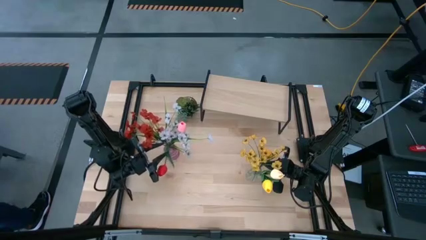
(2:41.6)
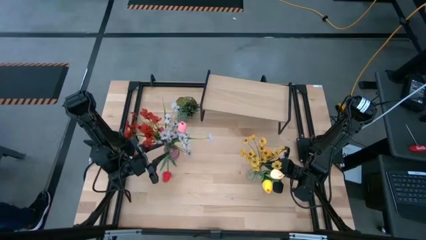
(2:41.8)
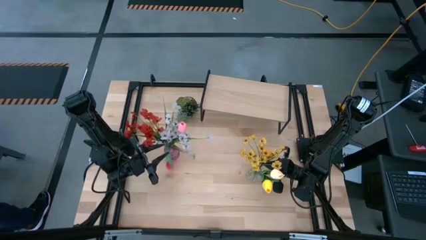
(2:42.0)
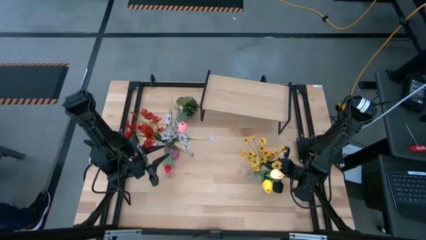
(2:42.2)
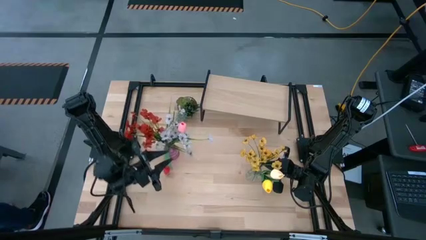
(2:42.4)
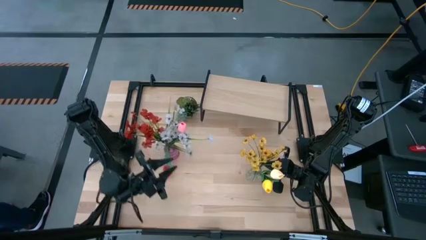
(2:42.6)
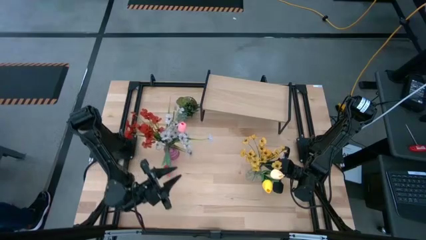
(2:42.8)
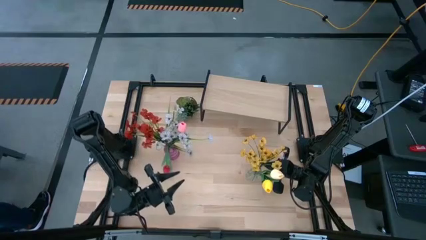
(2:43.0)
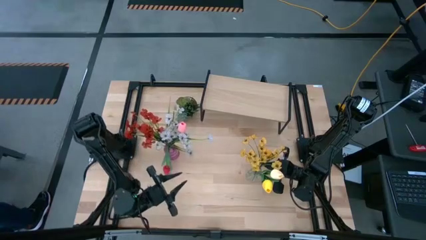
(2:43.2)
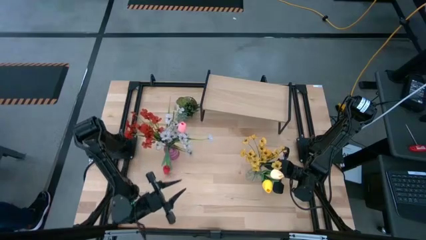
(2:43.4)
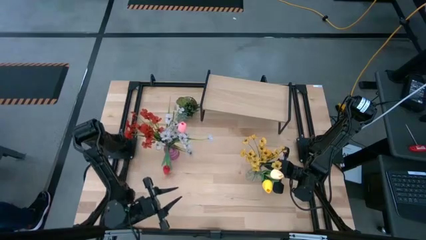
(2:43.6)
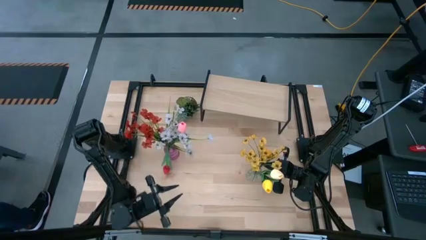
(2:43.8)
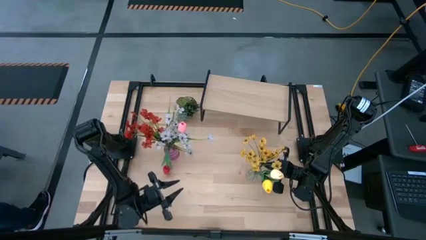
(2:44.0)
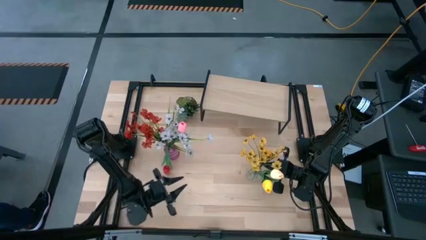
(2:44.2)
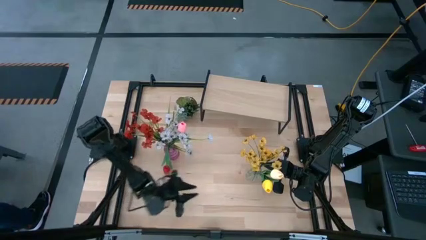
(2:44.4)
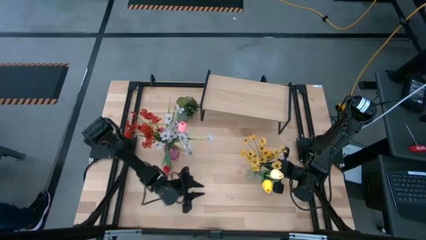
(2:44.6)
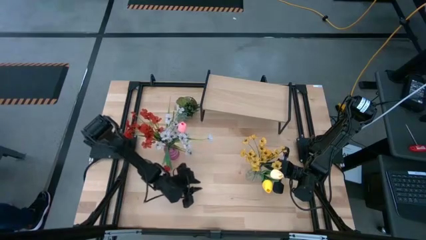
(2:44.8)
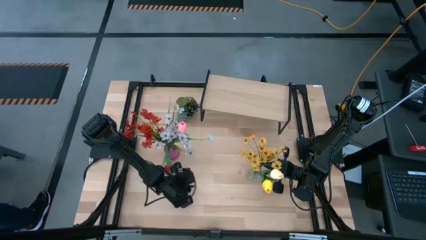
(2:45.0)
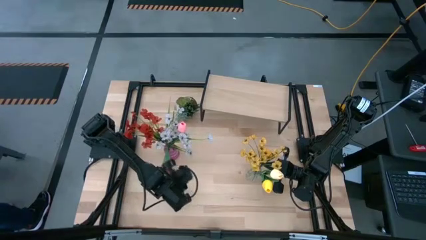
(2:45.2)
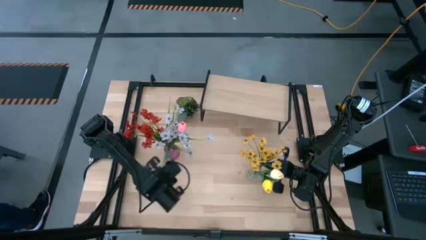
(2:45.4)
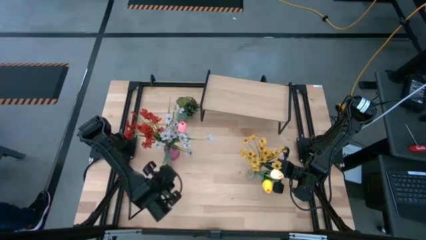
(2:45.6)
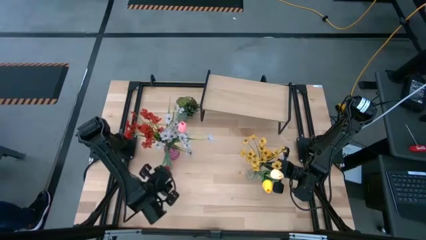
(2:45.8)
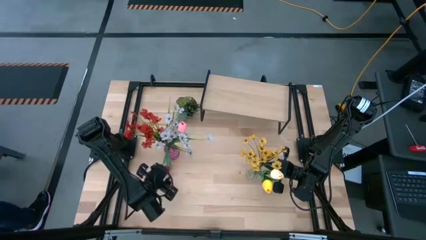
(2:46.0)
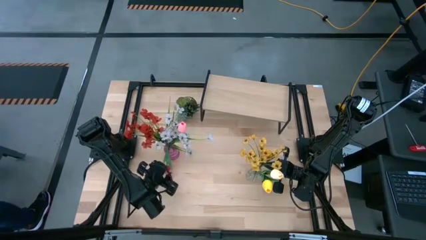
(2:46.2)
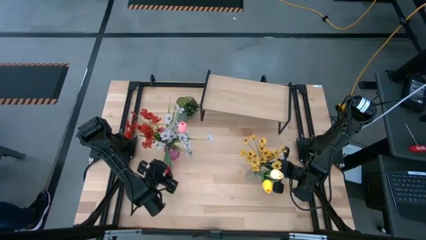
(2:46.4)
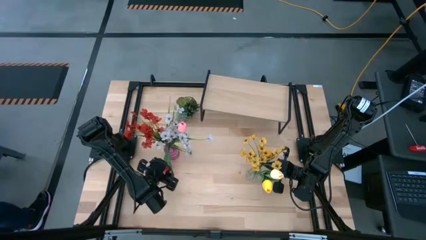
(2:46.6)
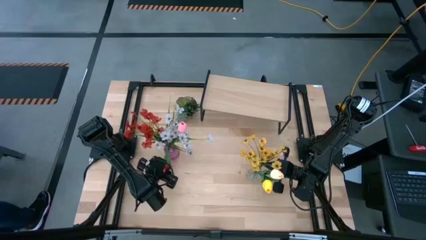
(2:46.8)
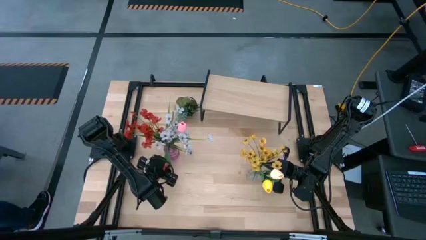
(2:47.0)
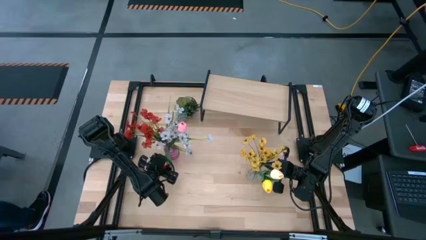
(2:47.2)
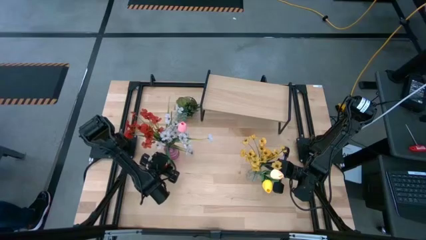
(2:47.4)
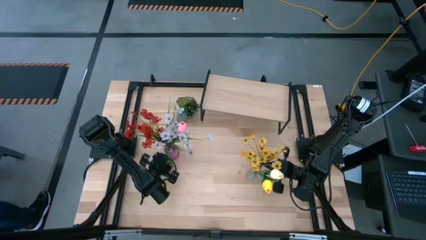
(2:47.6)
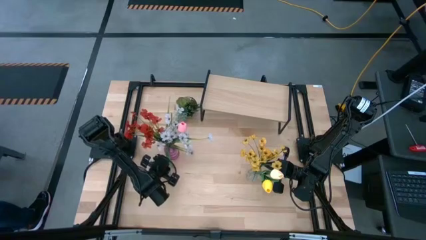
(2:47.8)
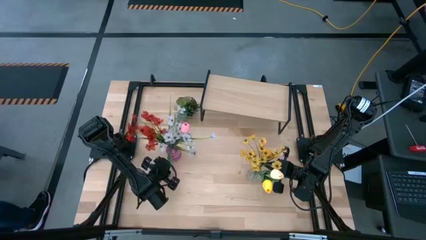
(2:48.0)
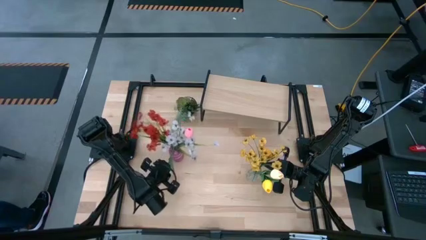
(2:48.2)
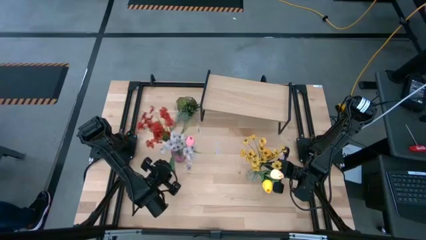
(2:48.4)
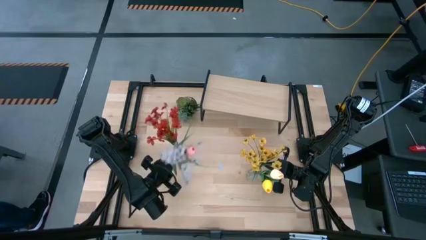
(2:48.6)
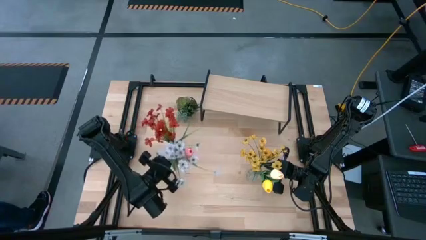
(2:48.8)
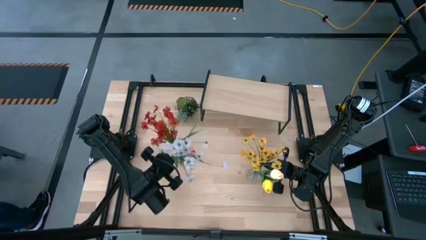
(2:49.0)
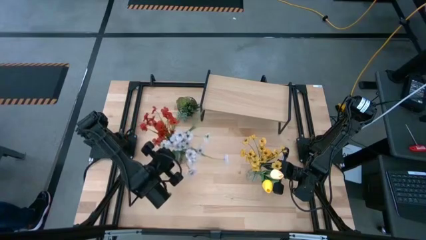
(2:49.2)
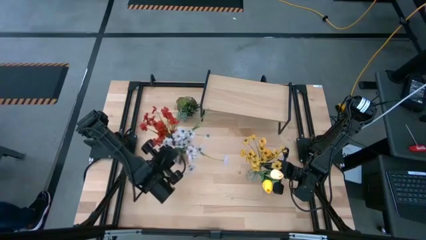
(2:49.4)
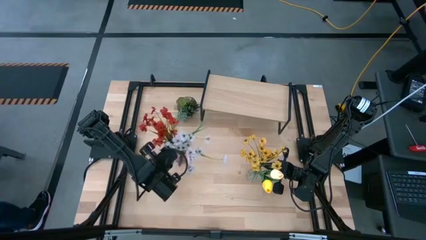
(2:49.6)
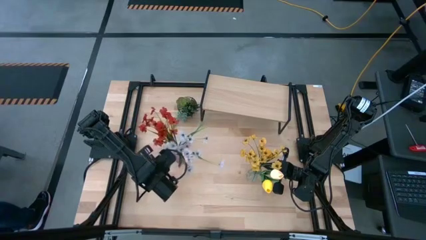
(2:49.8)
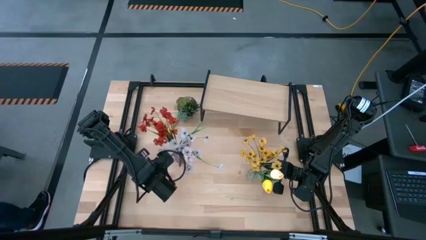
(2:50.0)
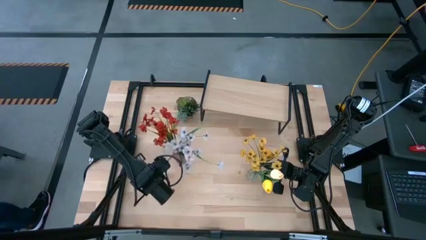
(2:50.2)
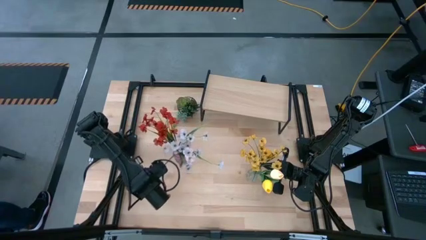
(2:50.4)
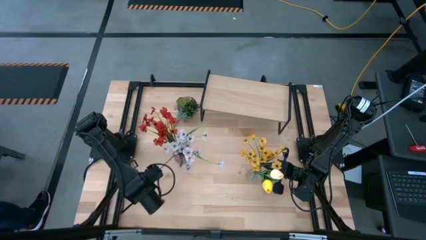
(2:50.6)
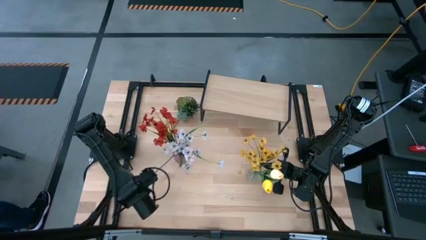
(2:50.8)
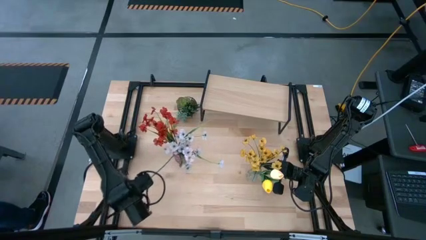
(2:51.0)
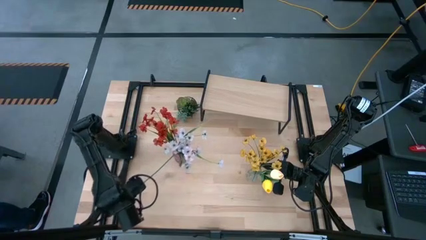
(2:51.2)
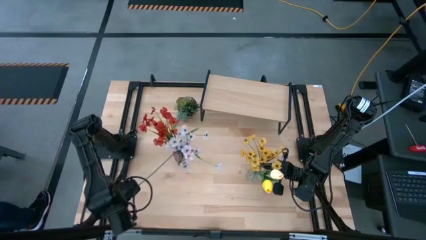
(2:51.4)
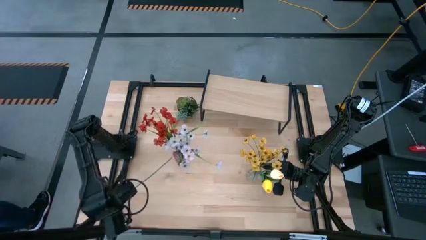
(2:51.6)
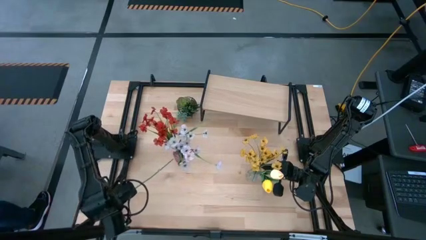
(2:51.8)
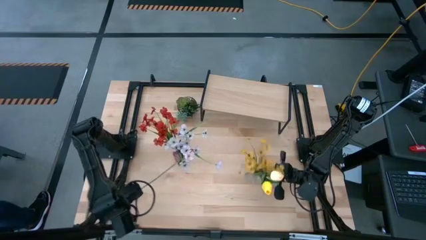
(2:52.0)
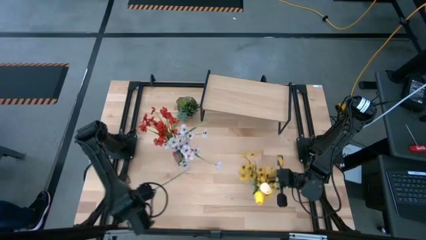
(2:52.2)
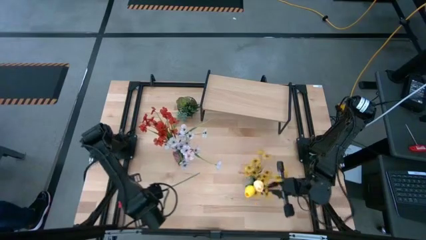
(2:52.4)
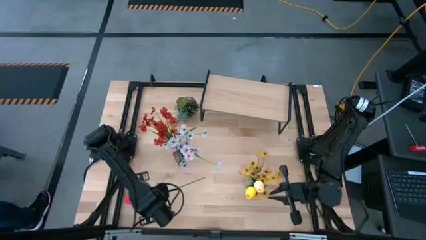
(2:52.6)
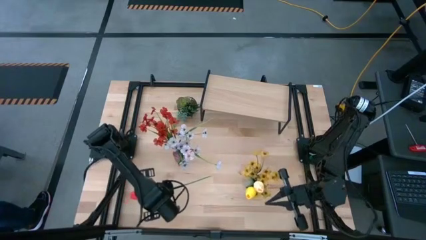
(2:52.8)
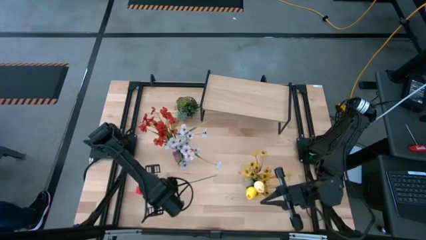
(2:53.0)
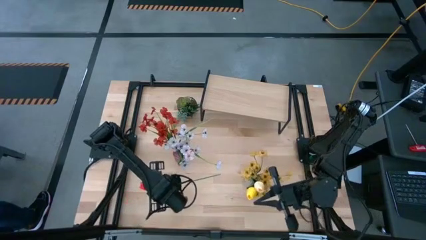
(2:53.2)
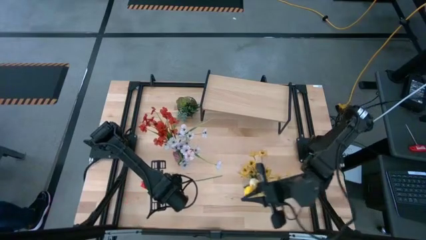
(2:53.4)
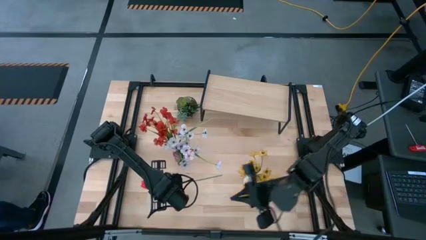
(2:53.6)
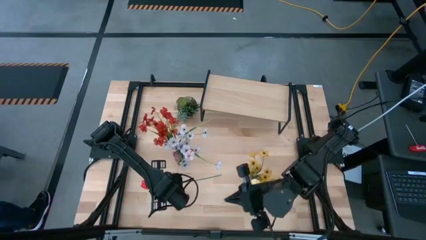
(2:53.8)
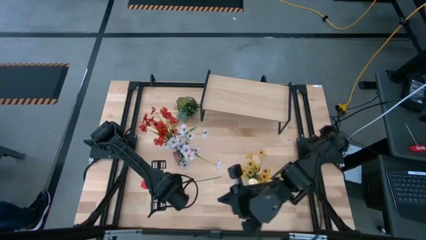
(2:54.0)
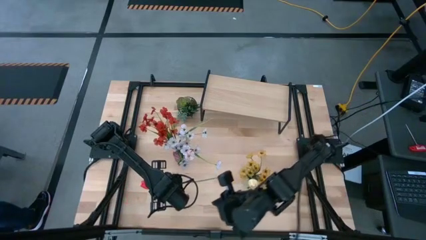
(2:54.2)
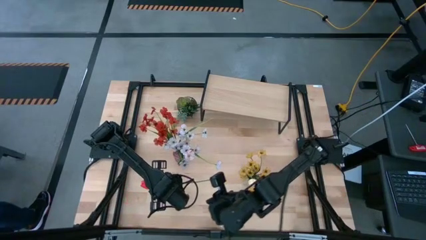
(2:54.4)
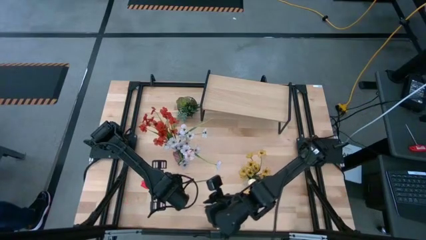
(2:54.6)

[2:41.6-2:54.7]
Task: Pick and place flowers into a vace then onto a shelf
Put the red flower into the violet vase

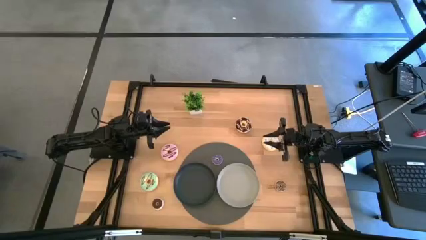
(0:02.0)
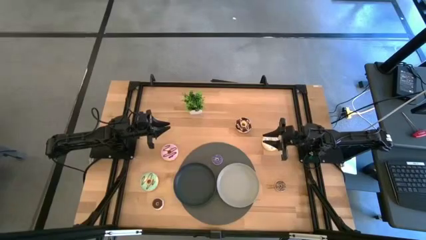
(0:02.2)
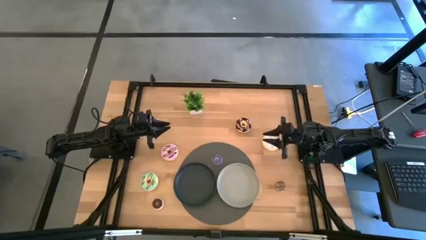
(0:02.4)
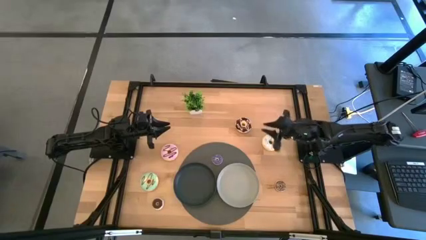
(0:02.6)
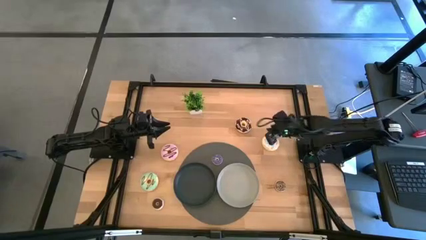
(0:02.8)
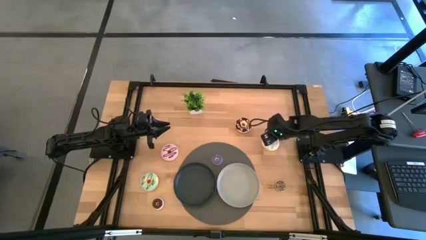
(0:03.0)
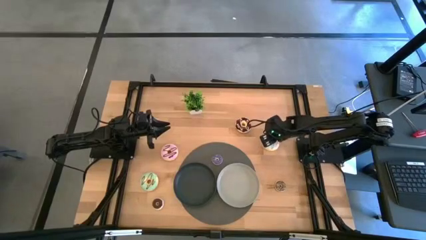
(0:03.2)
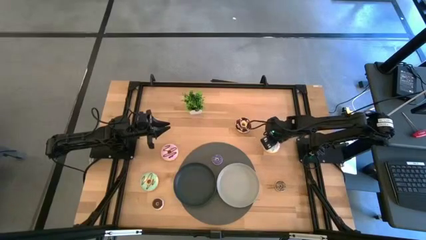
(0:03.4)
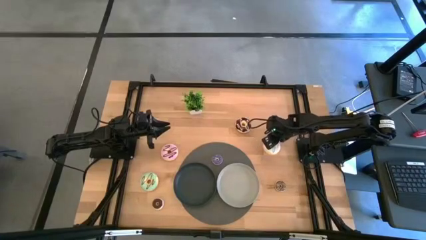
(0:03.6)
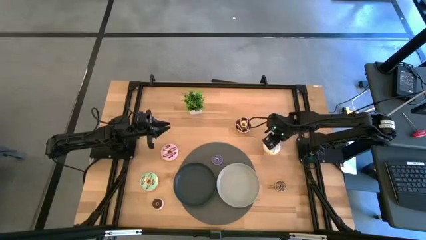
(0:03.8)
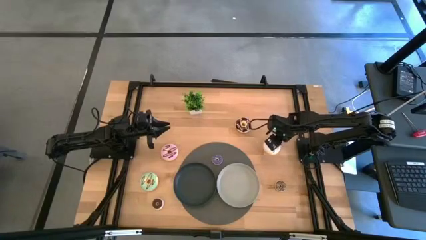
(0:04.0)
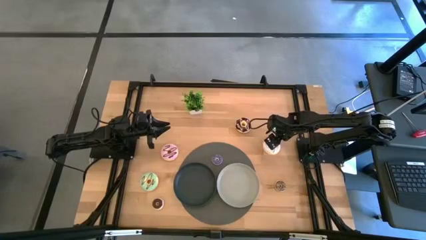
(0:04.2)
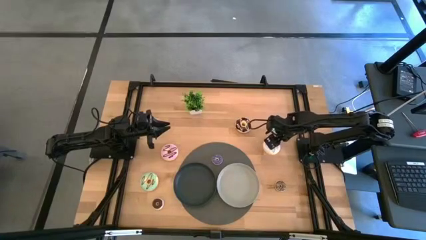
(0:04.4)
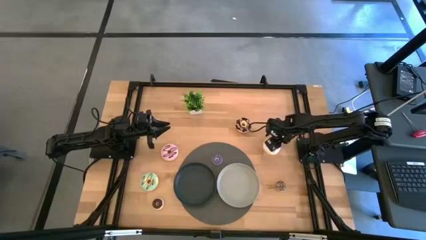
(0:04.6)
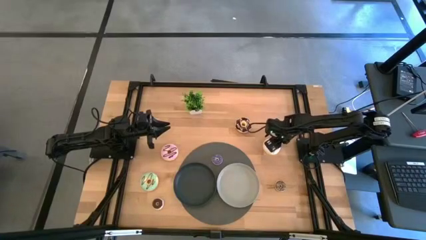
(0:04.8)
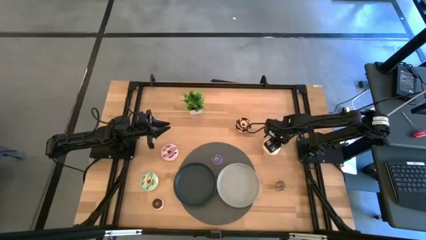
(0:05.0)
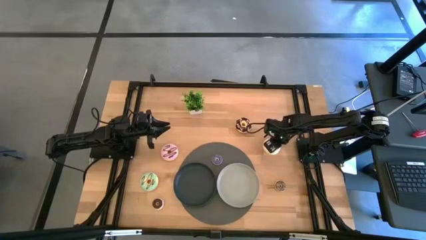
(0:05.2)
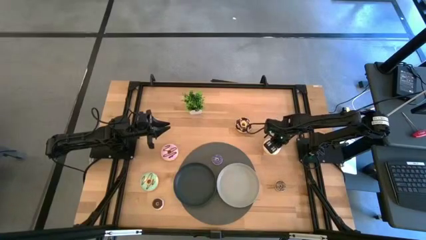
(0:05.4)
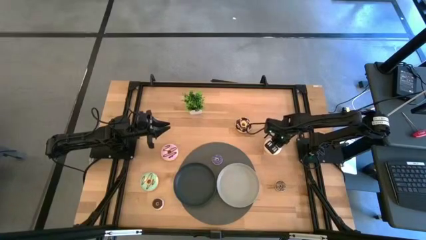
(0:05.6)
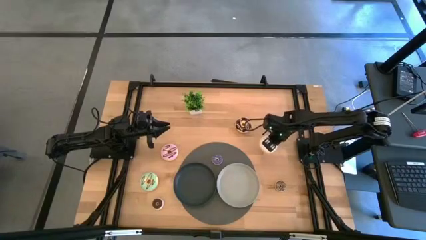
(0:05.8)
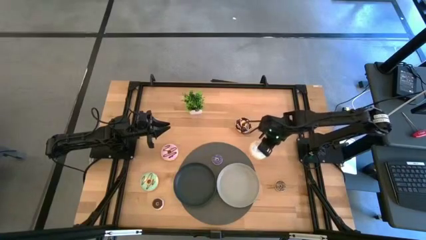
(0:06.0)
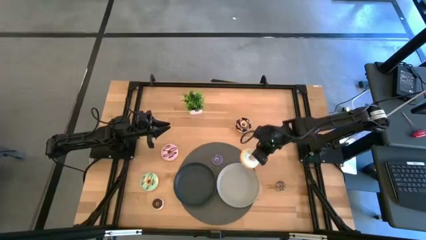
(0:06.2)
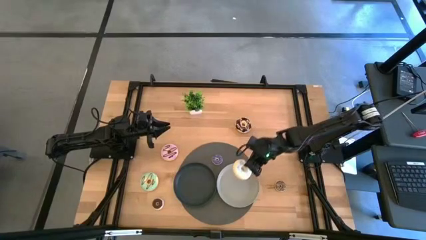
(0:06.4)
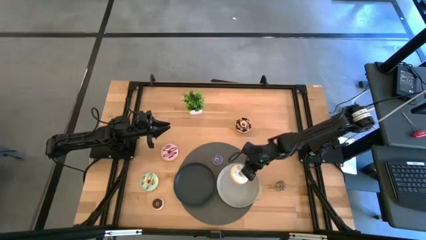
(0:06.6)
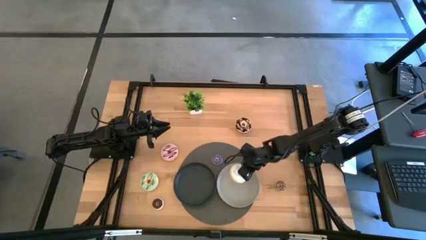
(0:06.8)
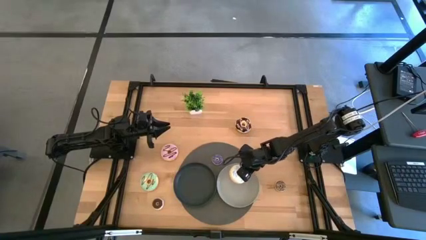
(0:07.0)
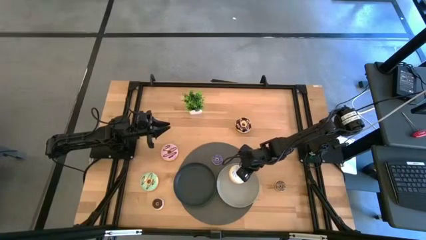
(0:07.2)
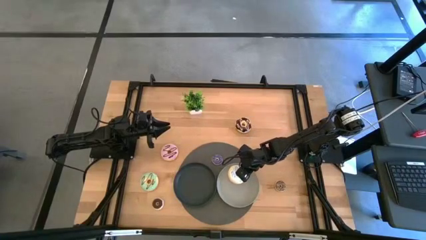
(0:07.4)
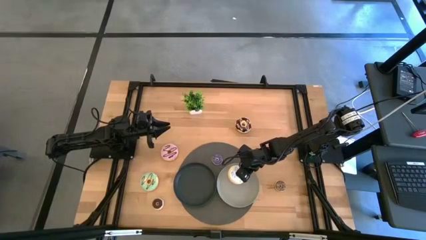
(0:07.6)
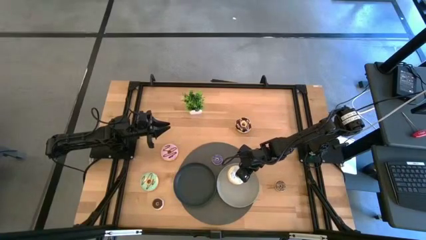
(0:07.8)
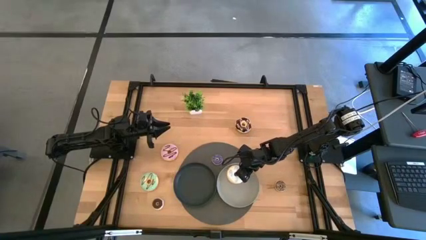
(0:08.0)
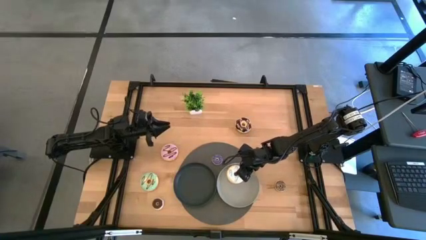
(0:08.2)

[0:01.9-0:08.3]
Task: Pick & Place donuts
Put the large white donut on the gray plate
